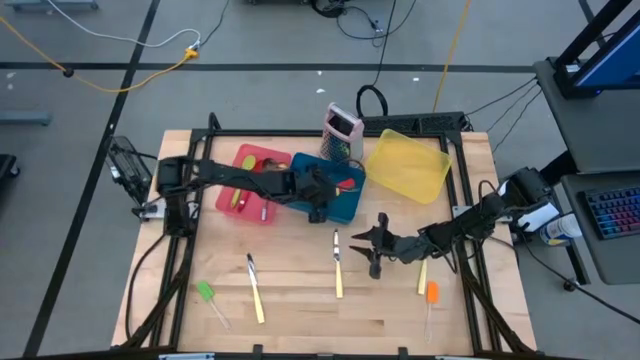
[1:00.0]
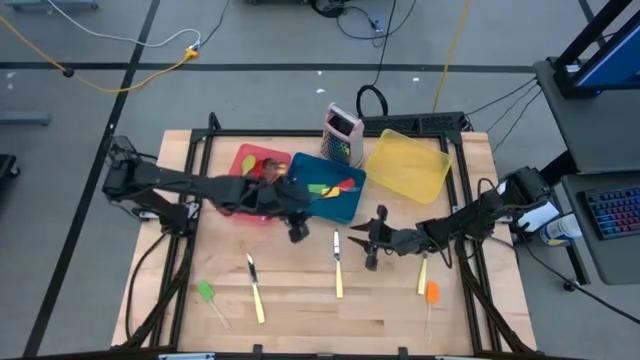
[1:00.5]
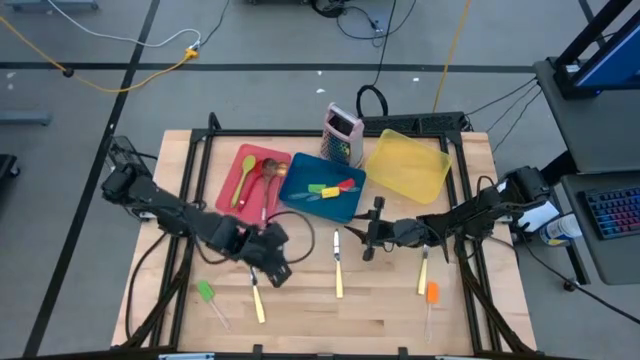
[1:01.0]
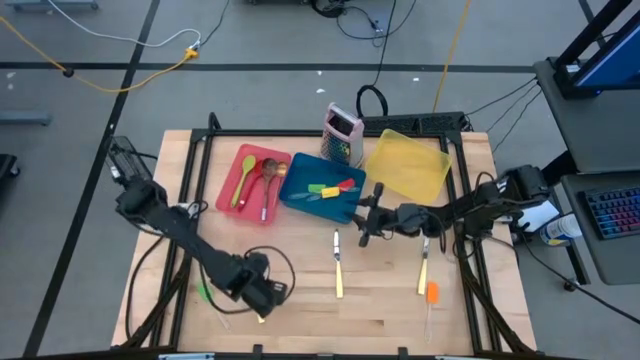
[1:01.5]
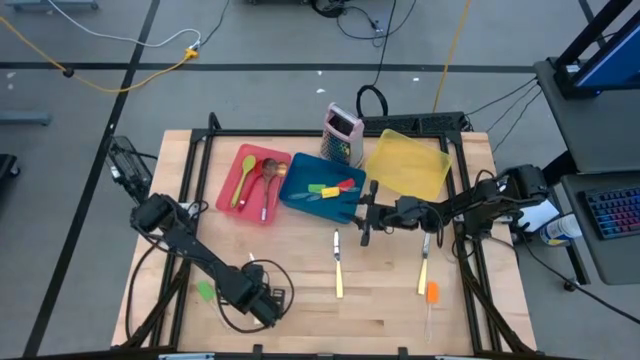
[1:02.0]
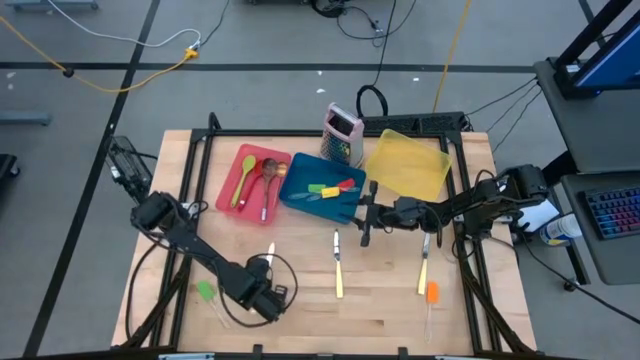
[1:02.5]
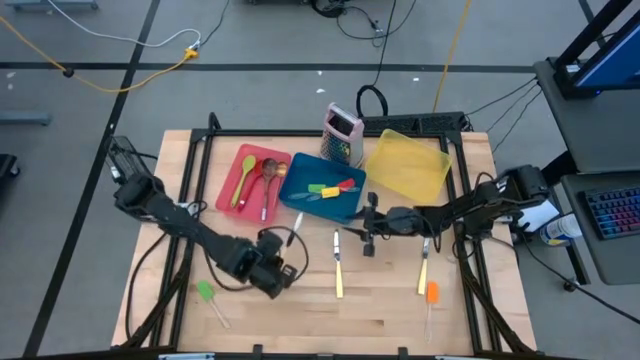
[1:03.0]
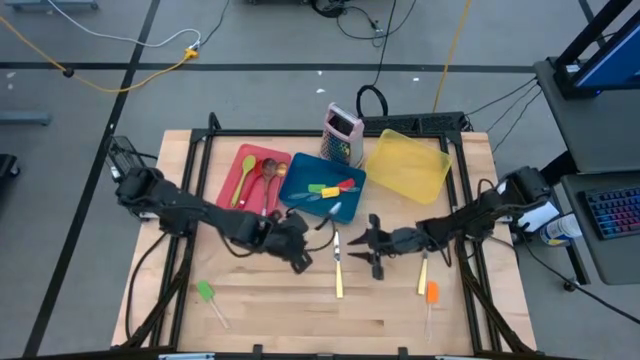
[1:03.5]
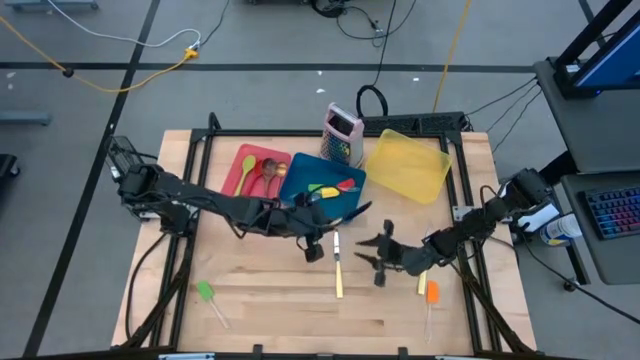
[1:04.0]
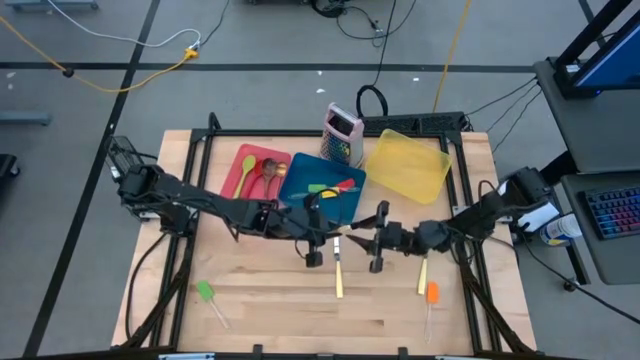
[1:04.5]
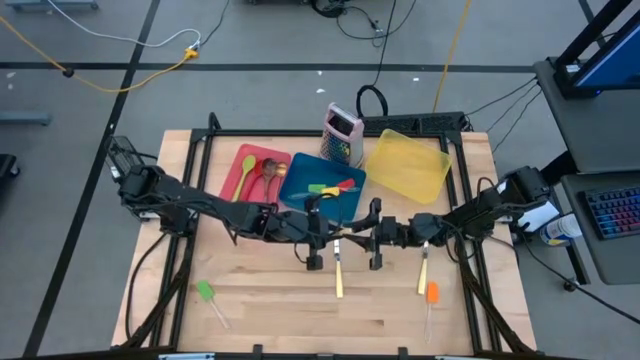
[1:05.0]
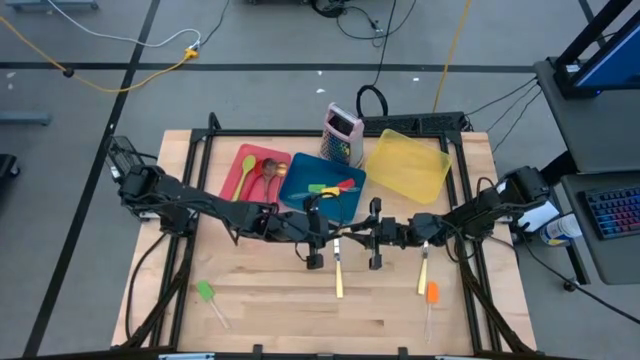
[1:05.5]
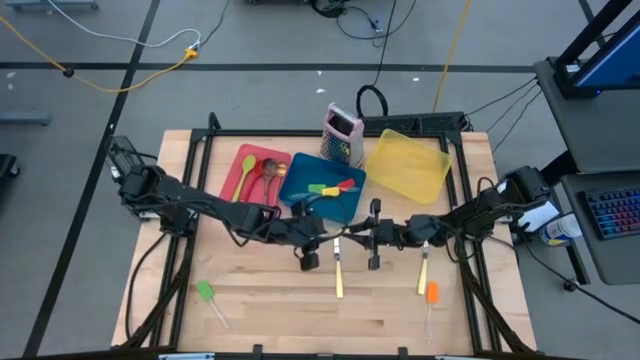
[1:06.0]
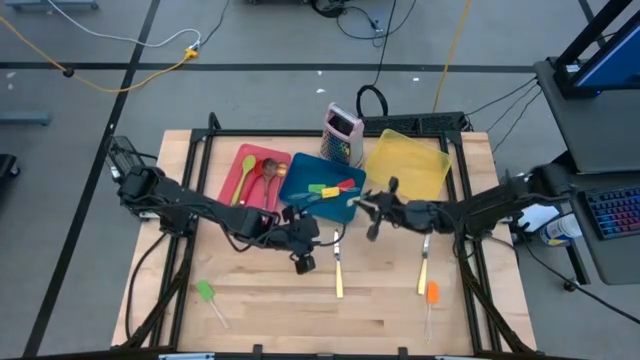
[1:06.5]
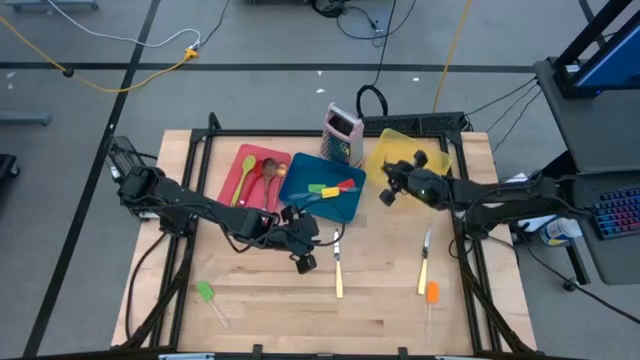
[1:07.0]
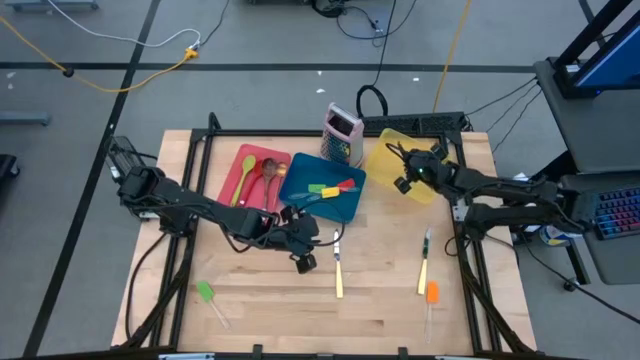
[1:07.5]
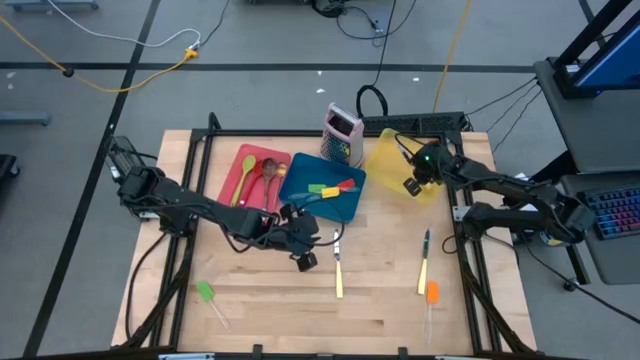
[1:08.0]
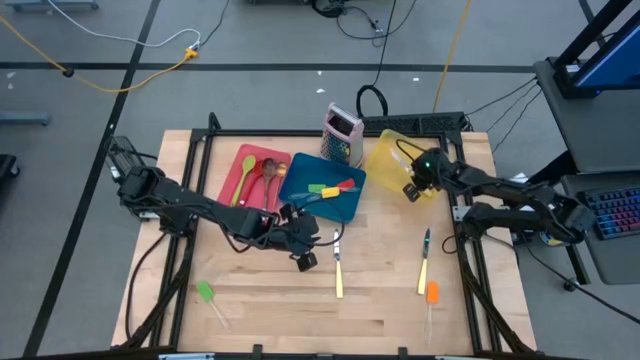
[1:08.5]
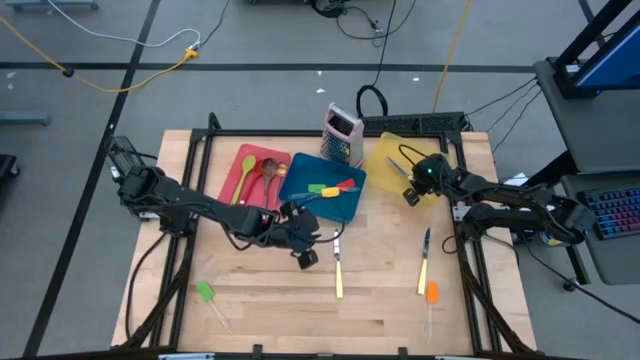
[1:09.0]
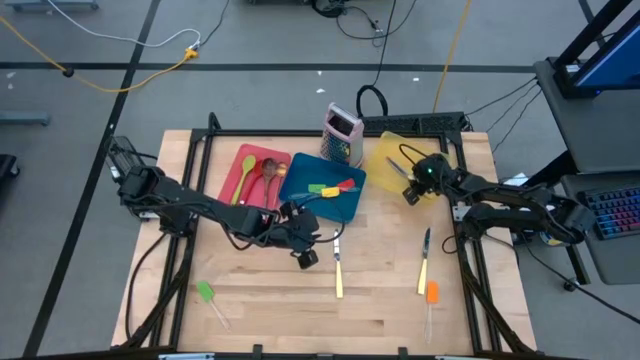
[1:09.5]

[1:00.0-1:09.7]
Task: Pick & Place Kitchen Items
Put the left yellow knife into the yellow bin

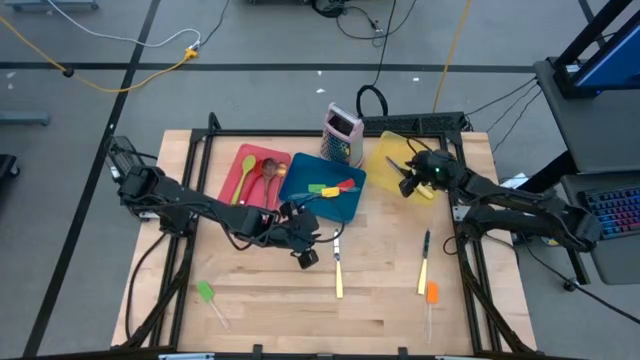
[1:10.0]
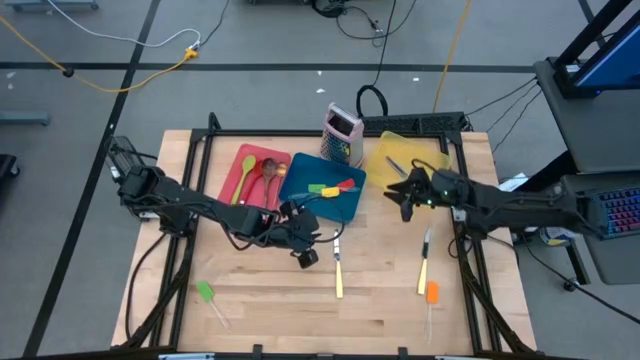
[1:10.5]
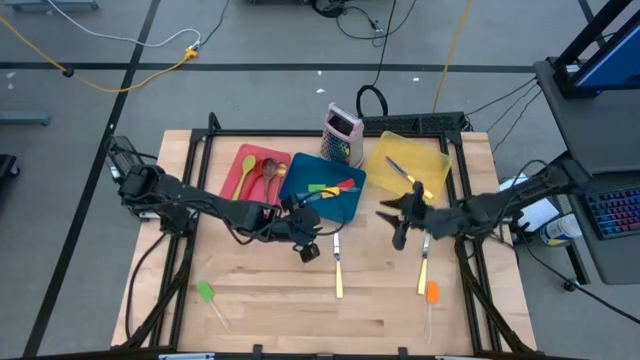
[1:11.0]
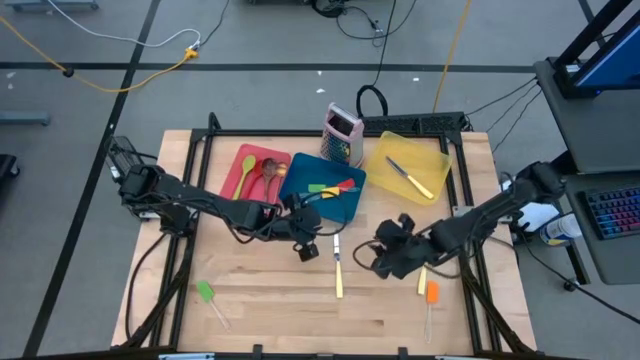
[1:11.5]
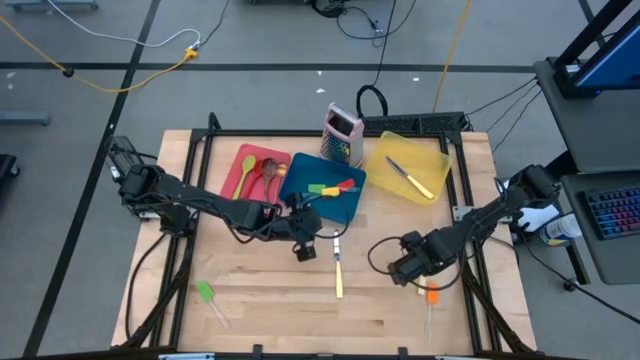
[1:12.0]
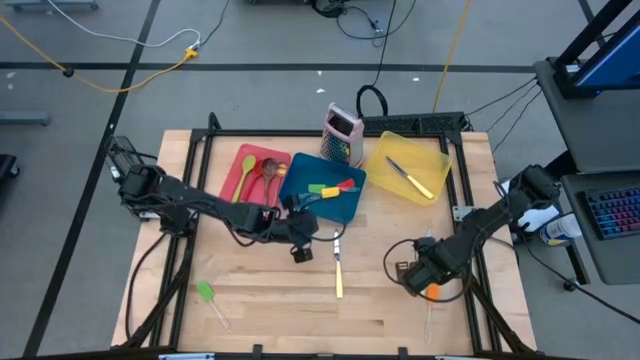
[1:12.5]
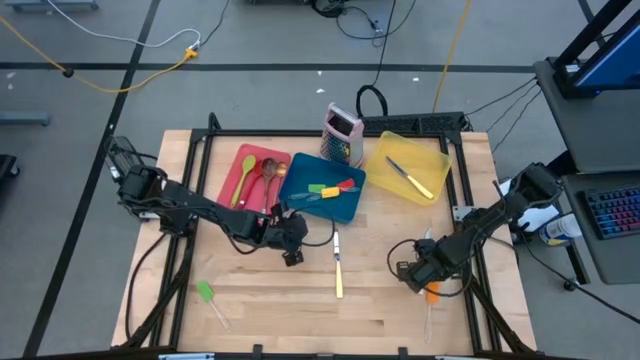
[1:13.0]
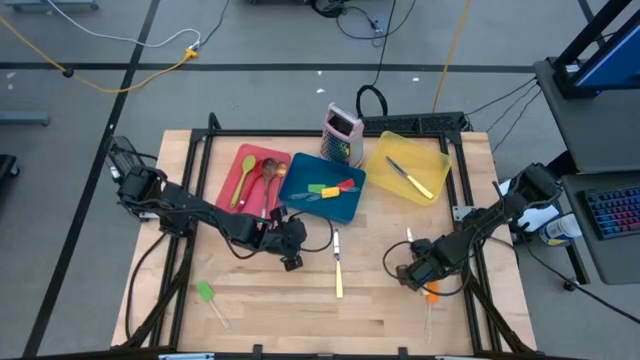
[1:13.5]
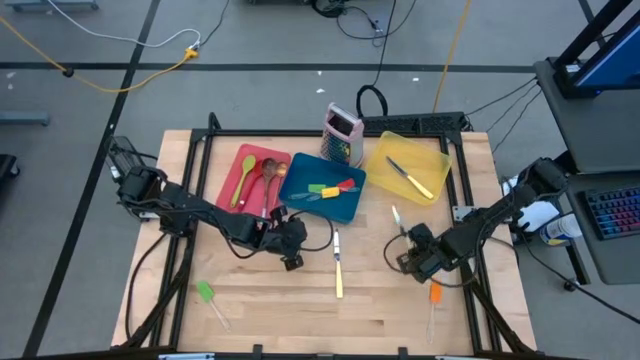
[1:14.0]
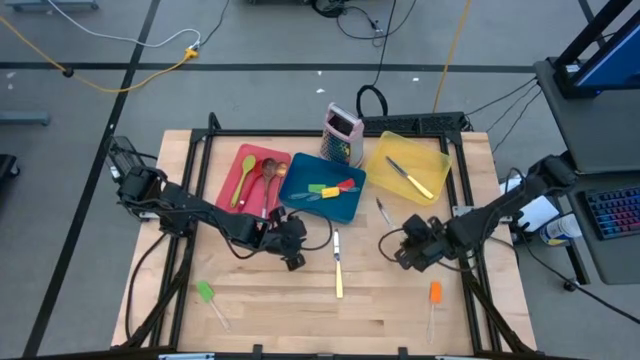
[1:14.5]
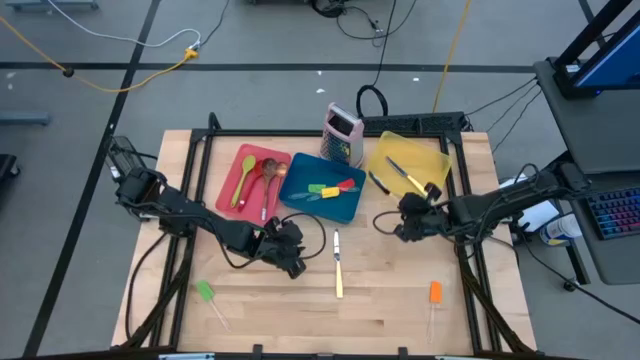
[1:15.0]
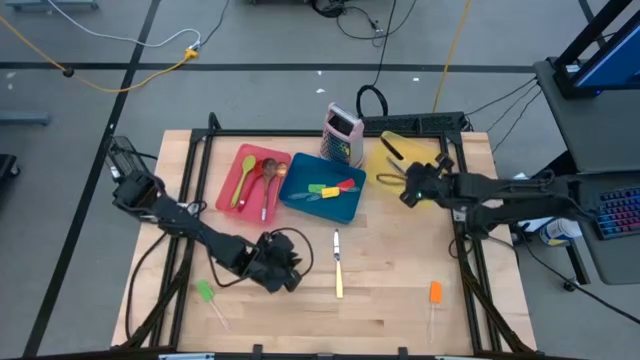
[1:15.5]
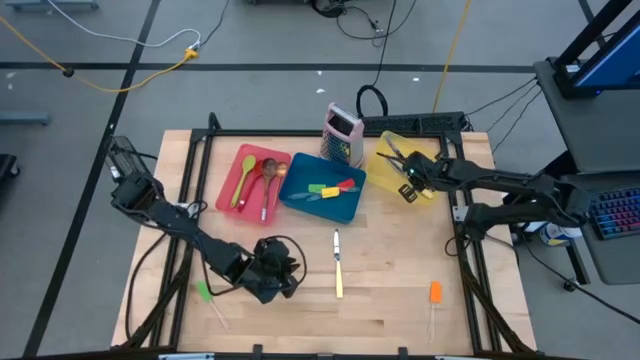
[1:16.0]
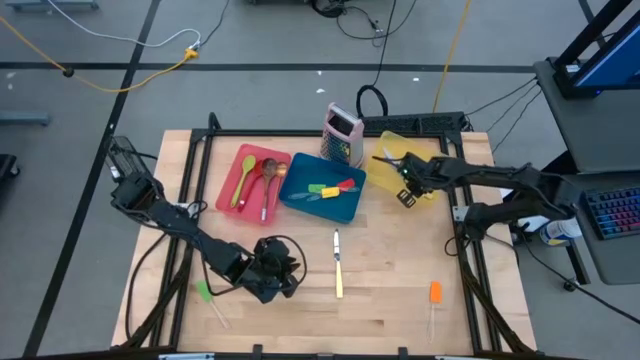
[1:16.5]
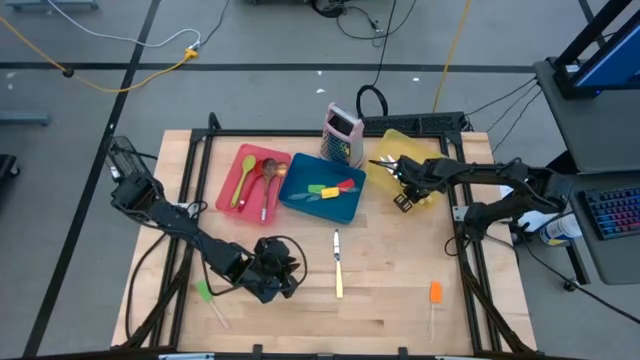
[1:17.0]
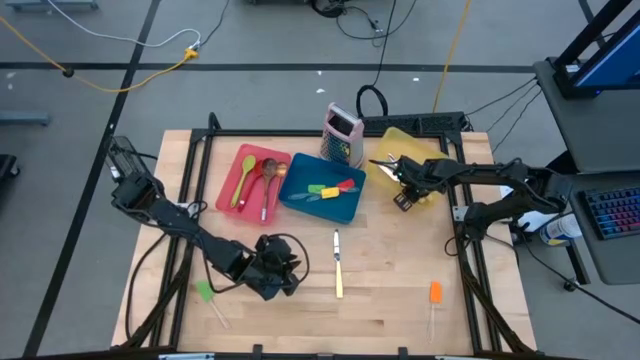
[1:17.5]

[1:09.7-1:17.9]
Put the right yellow knife into the yellow bin

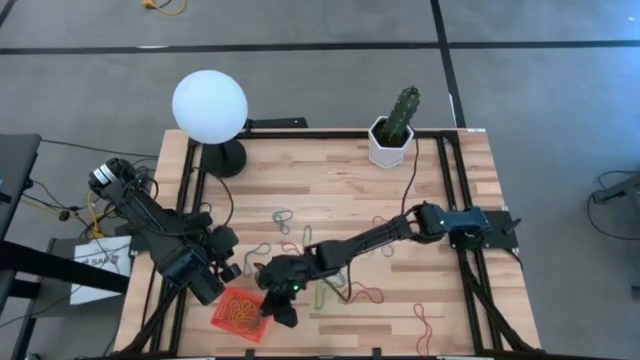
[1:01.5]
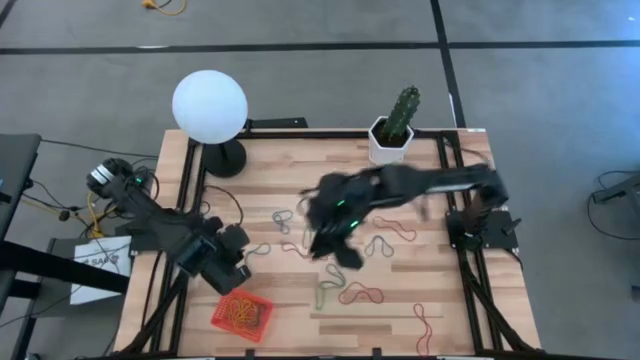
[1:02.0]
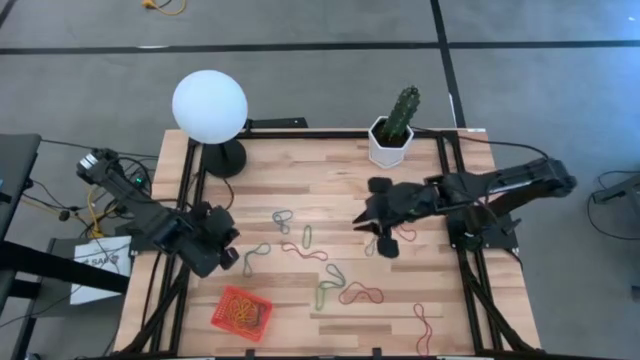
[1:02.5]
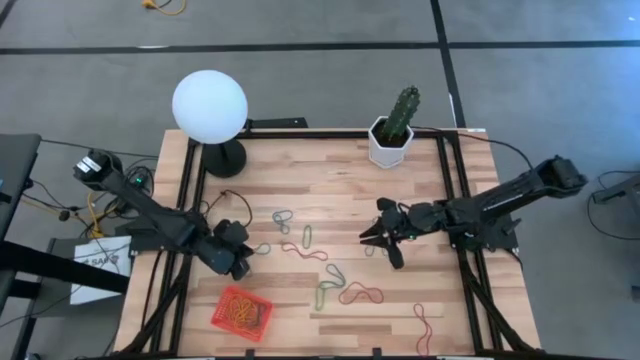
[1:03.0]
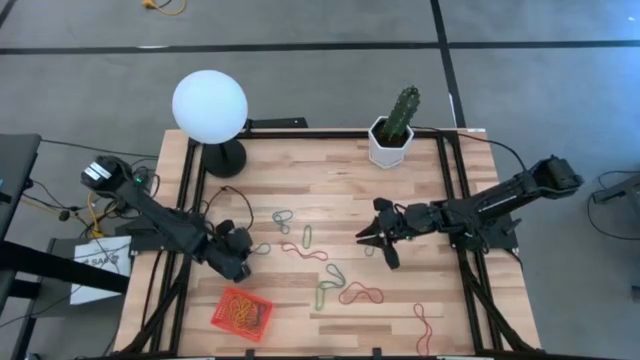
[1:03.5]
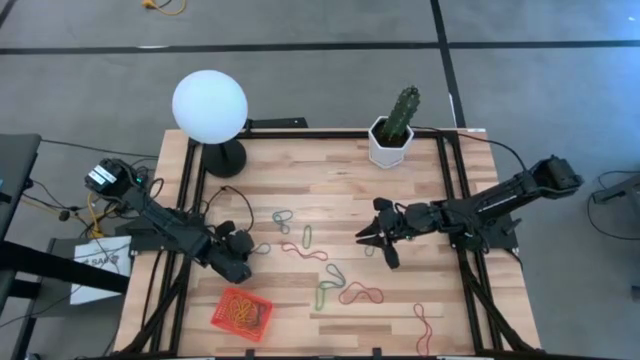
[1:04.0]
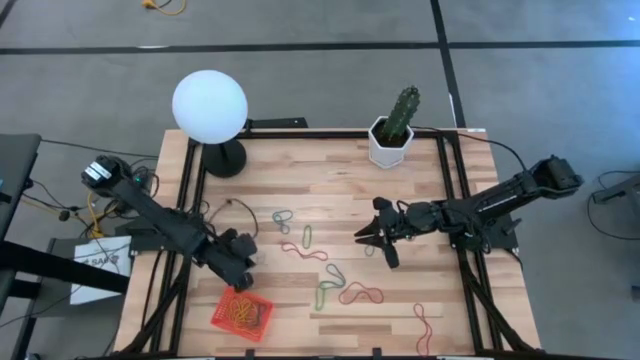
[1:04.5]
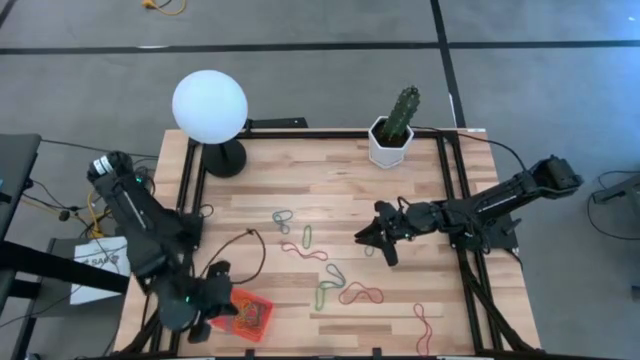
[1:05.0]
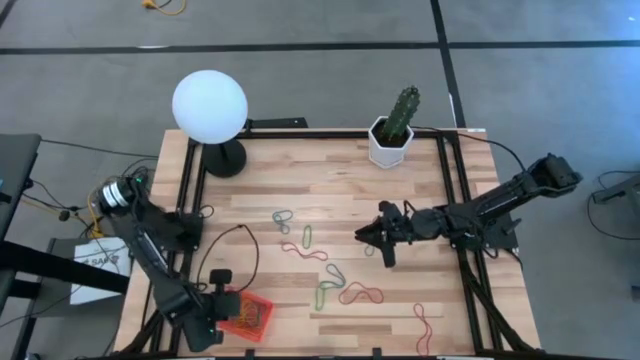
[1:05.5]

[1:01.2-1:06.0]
Task: Pick and place rubber bands into bin
Put the blue rubber band into the basket
